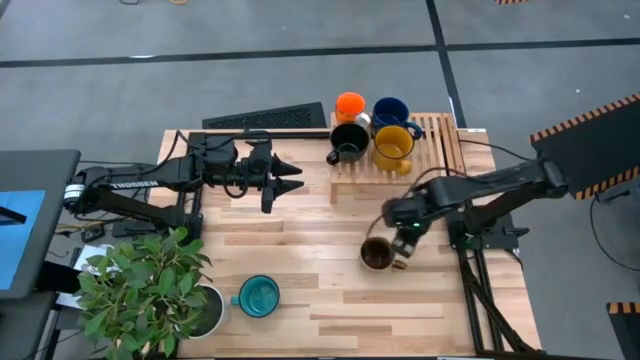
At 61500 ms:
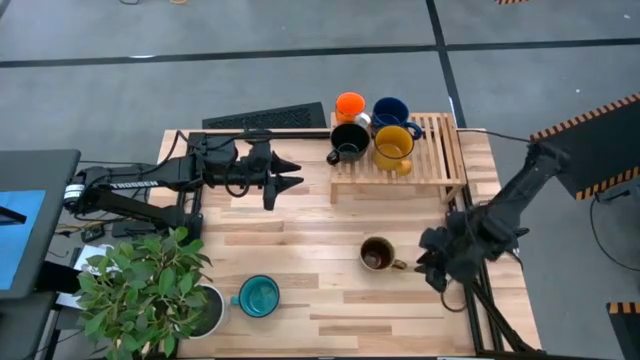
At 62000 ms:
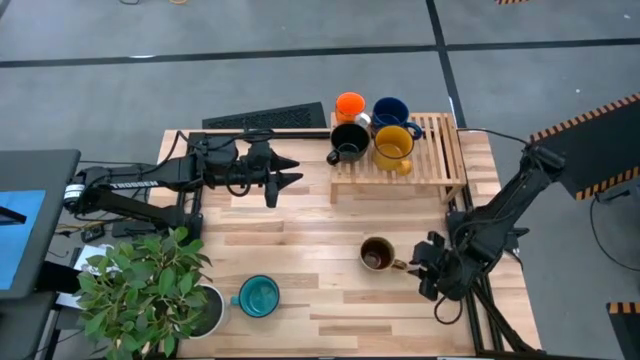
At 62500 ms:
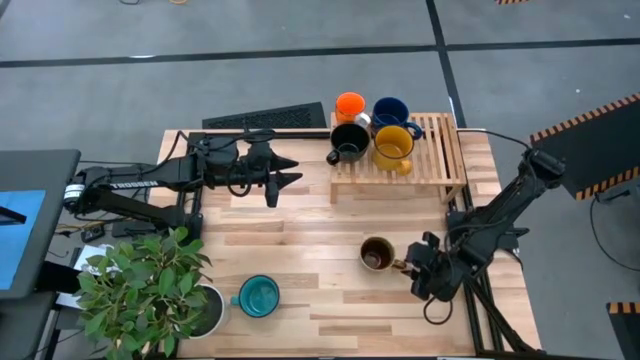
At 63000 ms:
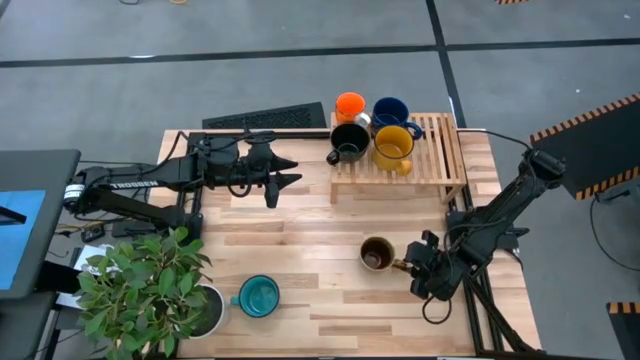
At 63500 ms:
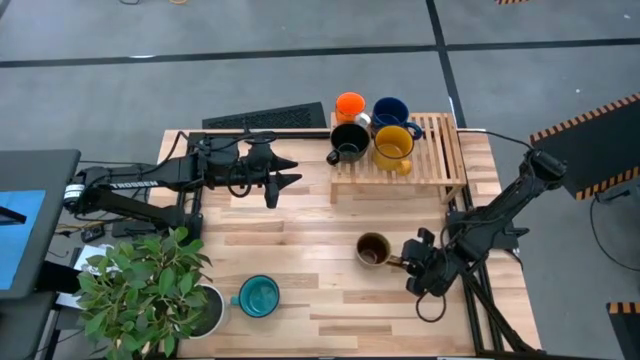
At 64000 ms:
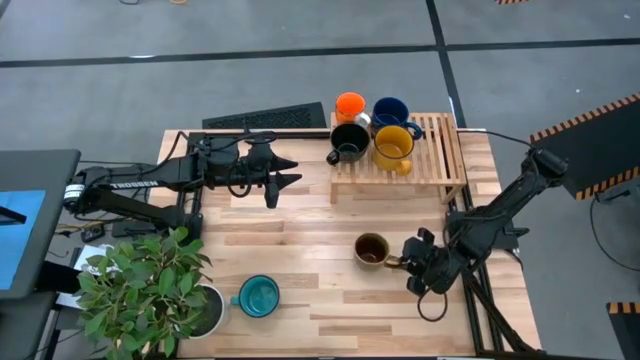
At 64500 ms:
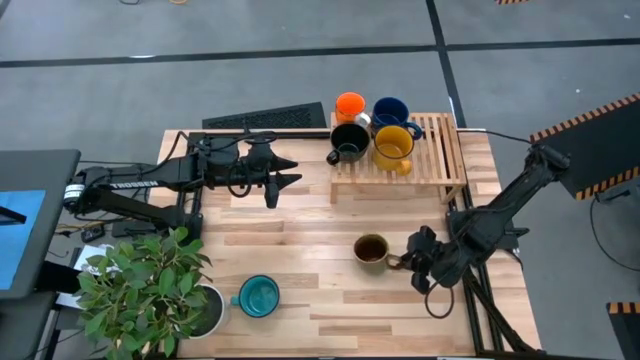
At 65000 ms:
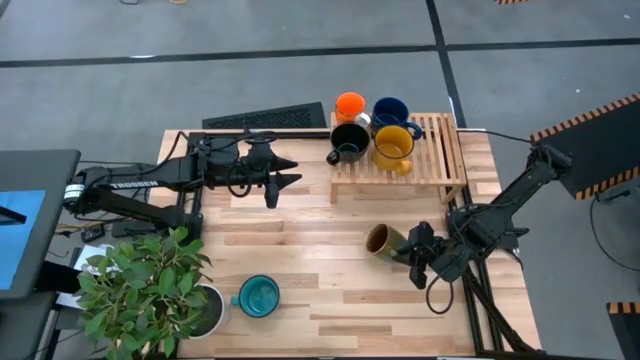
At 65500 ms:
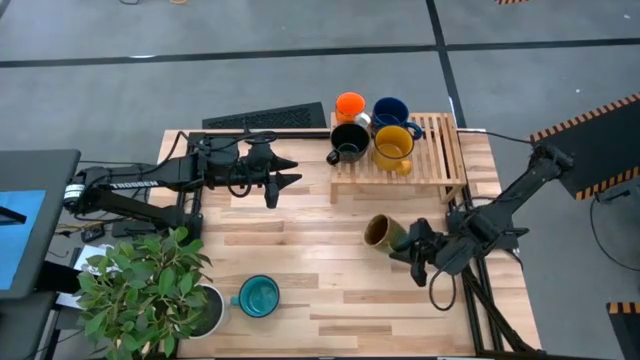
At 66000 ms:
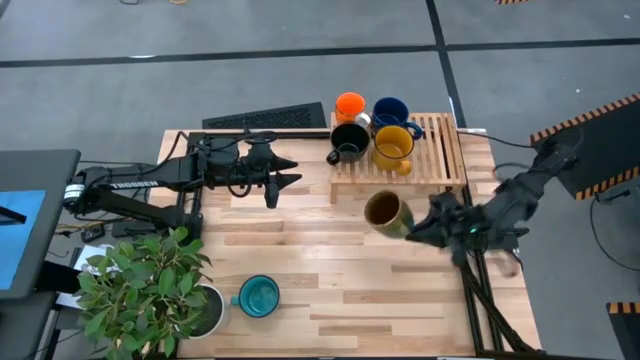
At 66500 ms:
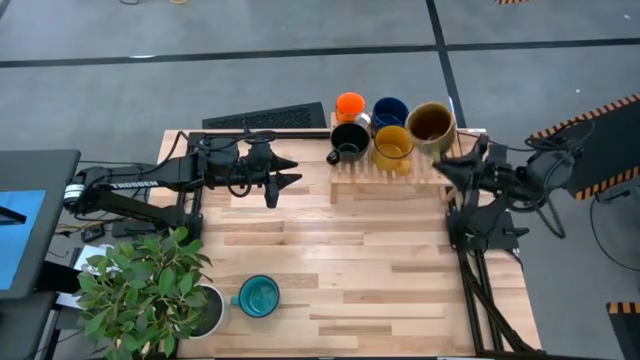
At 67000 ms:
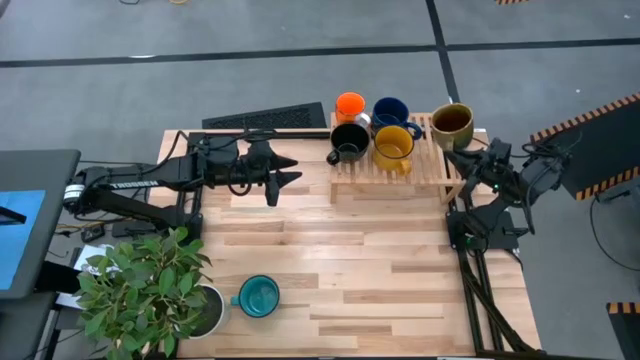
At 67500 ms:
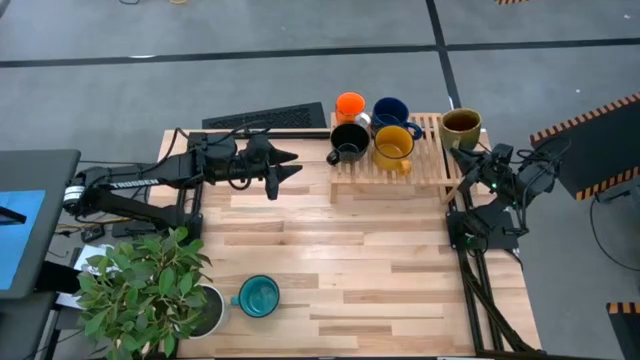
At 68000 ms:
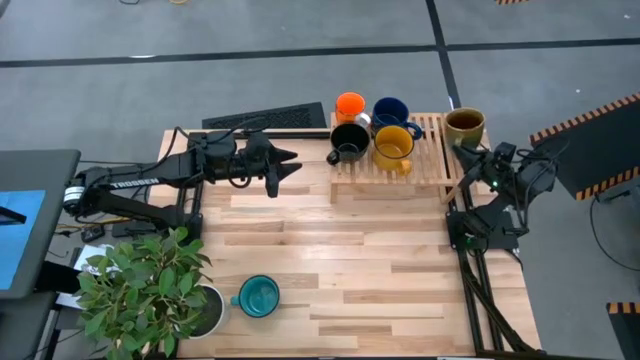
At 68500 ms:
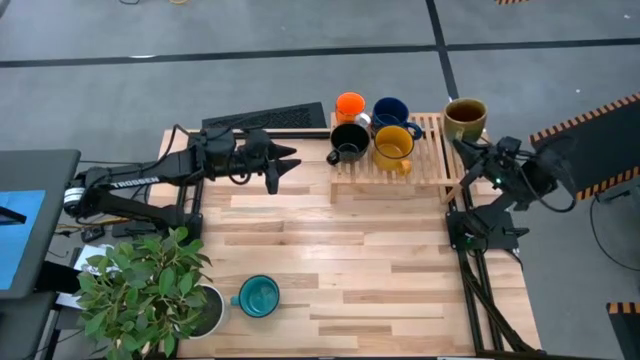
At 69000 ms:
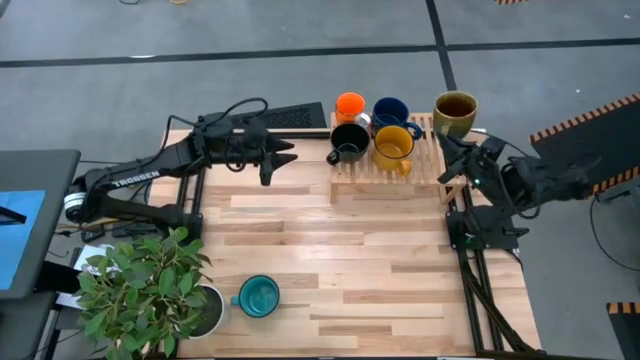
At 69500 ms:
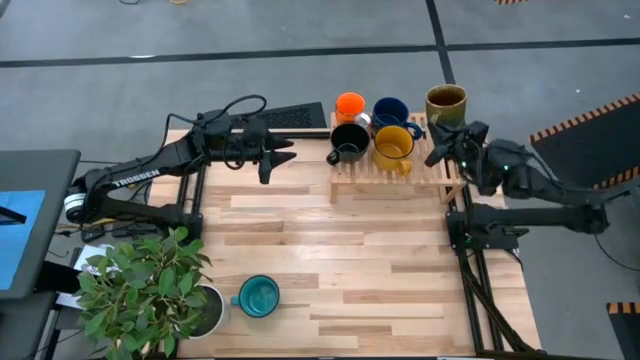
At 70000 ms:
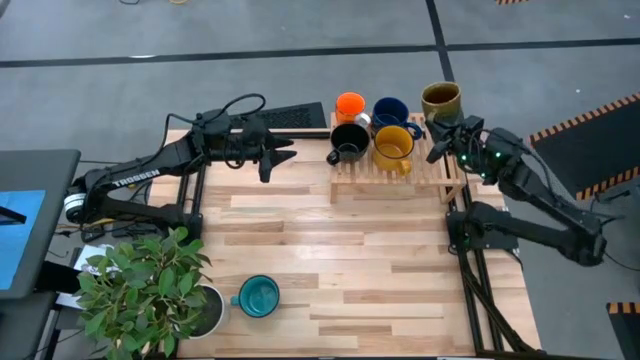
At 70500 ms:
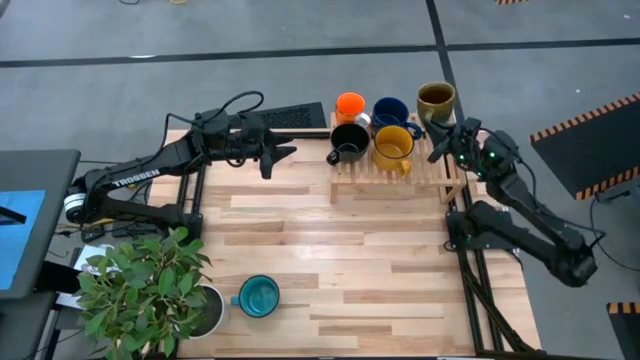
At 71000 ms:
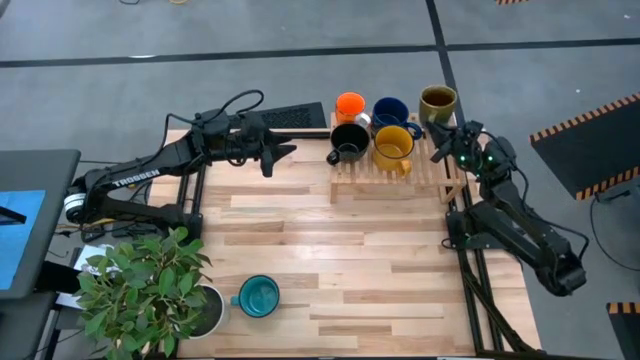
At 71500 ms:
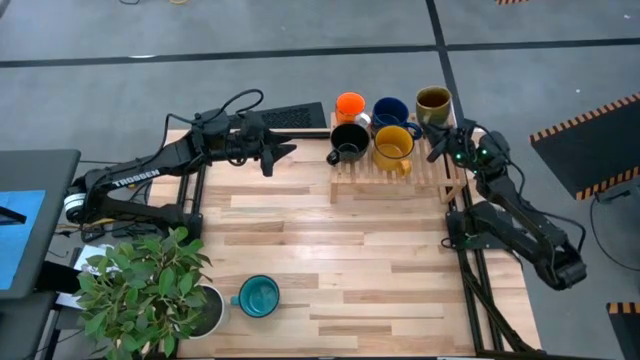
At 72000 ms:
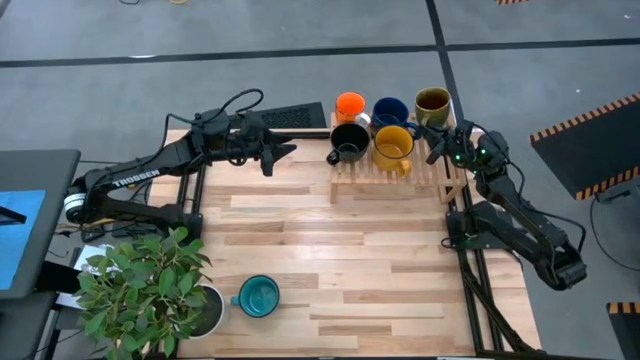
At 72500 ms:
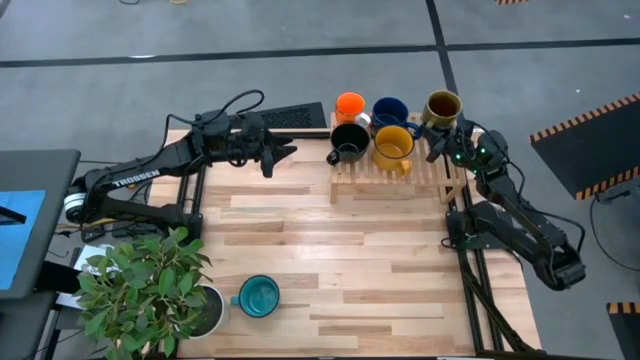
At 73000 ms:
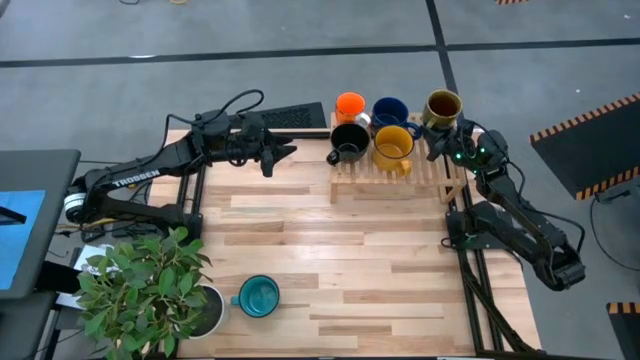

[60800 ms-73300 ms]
Task: Place coffee mugs
Put the dark green patterned mug on the shelf

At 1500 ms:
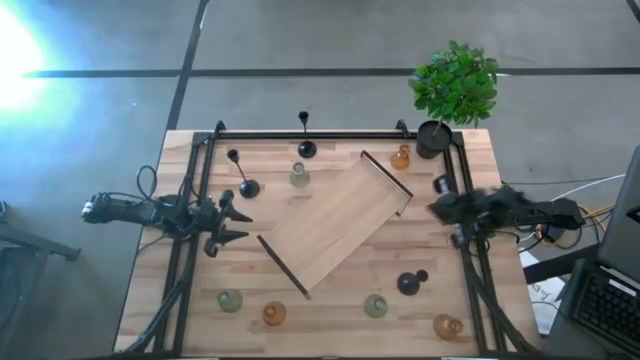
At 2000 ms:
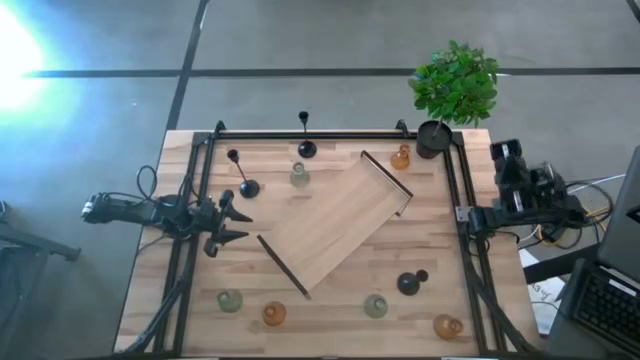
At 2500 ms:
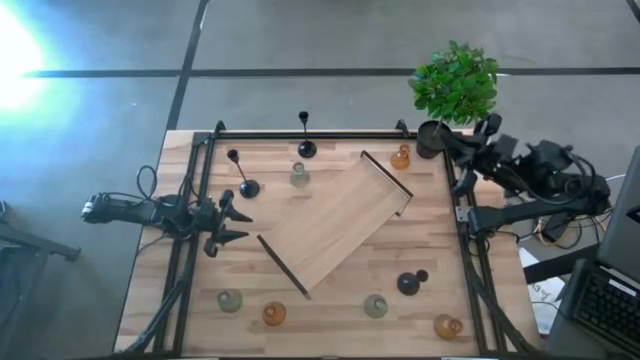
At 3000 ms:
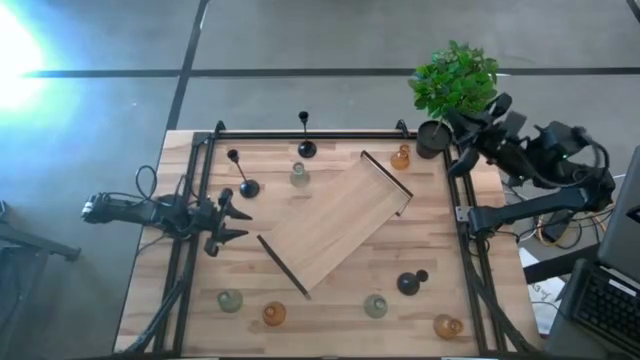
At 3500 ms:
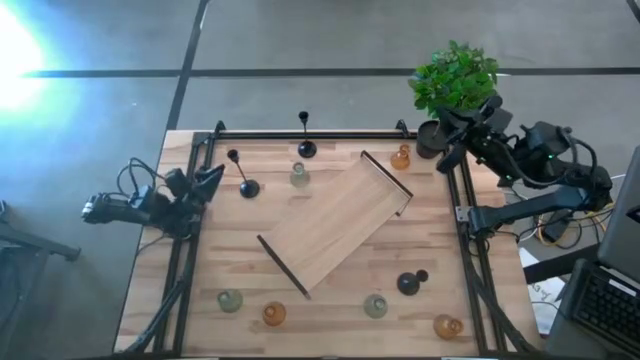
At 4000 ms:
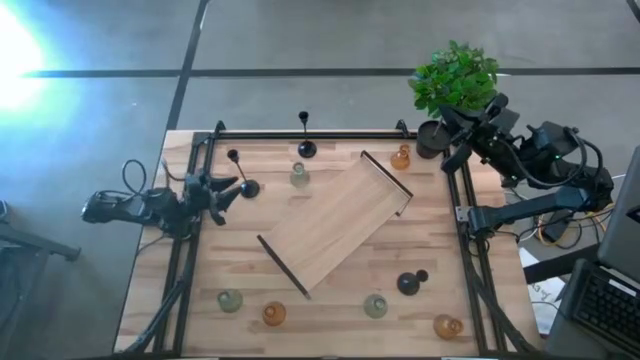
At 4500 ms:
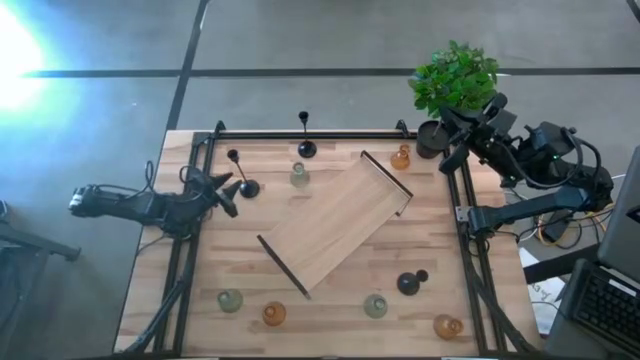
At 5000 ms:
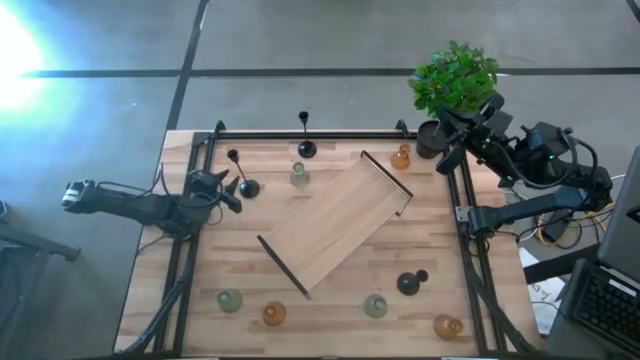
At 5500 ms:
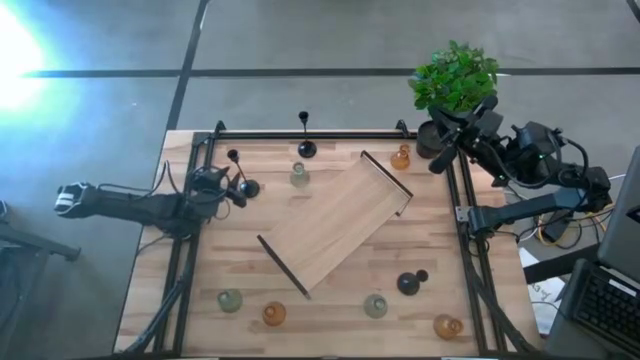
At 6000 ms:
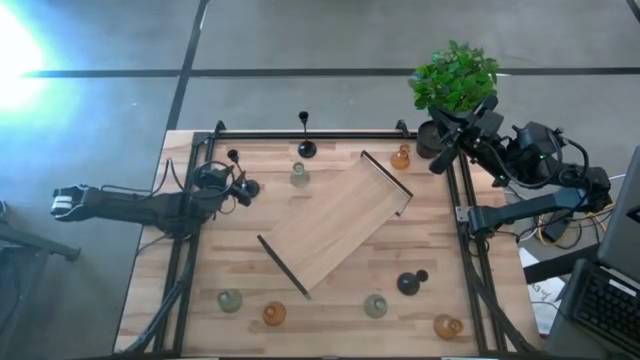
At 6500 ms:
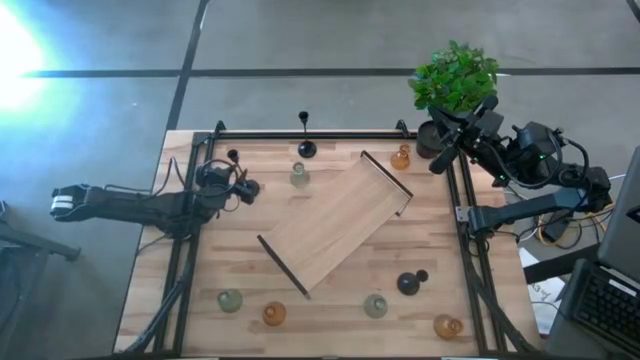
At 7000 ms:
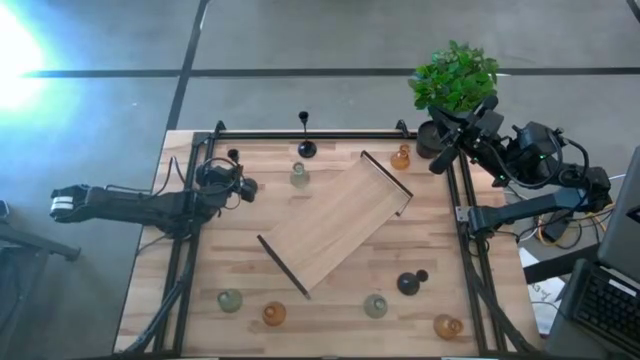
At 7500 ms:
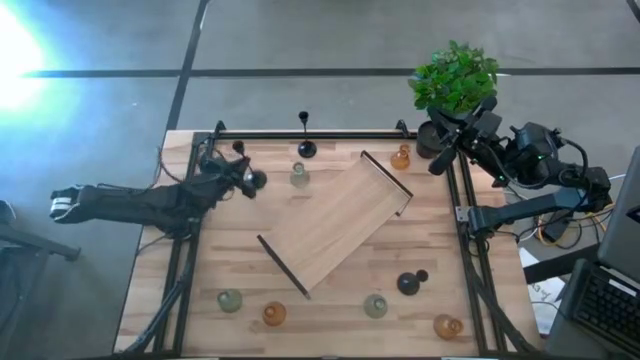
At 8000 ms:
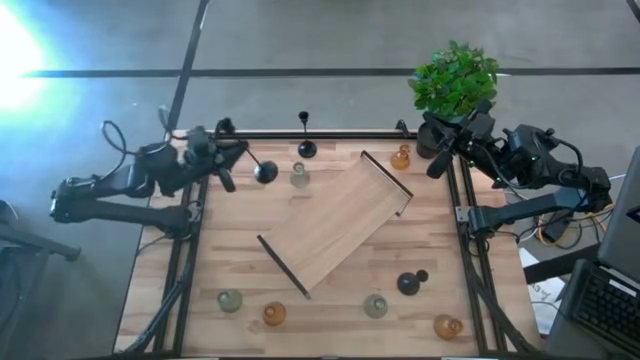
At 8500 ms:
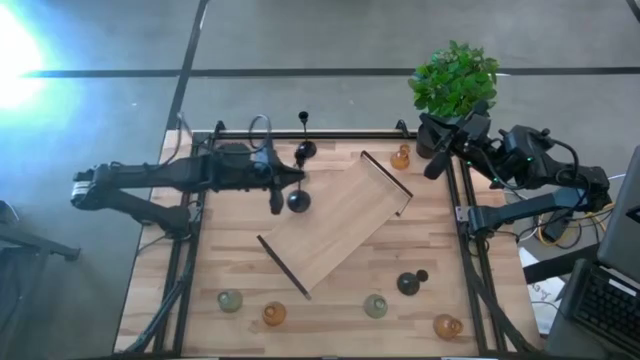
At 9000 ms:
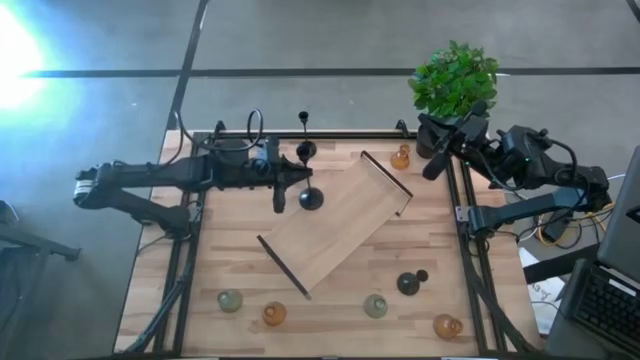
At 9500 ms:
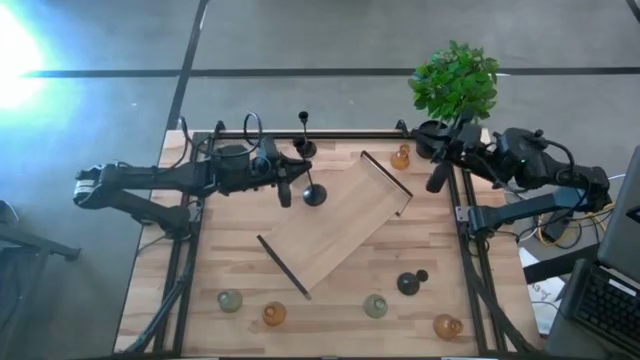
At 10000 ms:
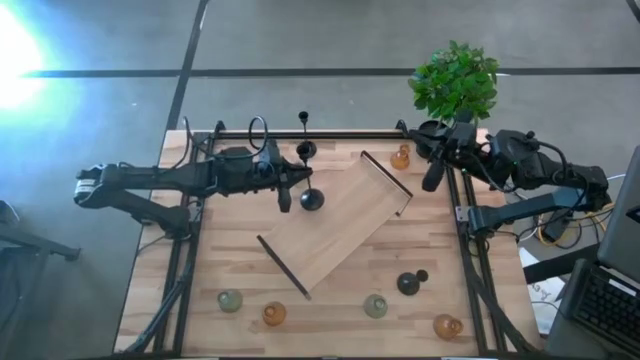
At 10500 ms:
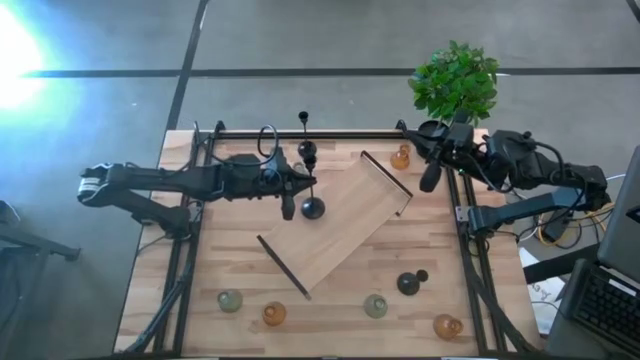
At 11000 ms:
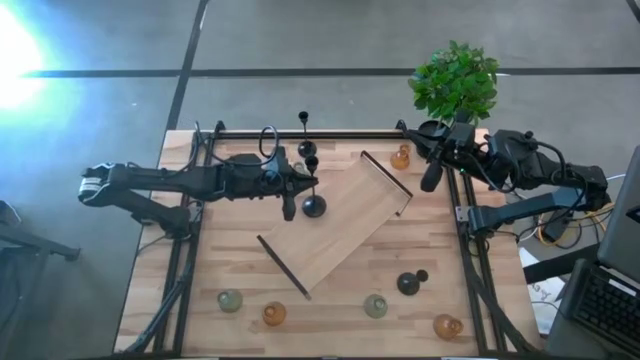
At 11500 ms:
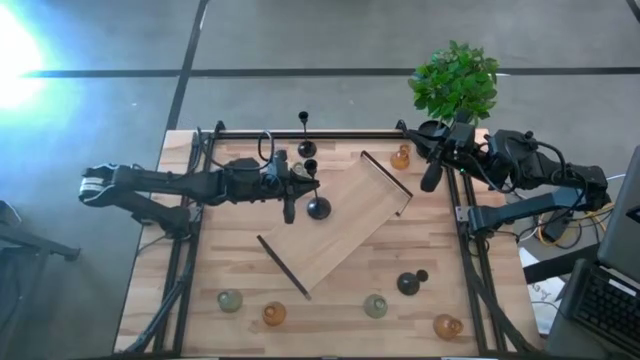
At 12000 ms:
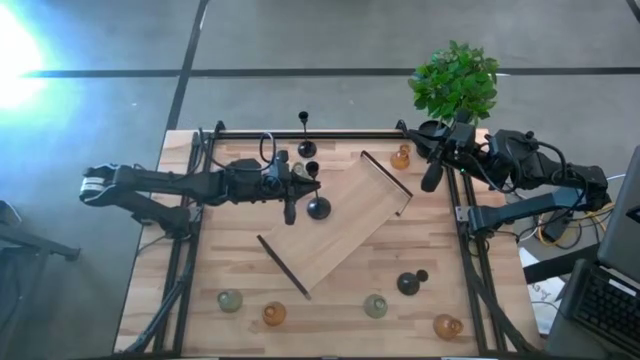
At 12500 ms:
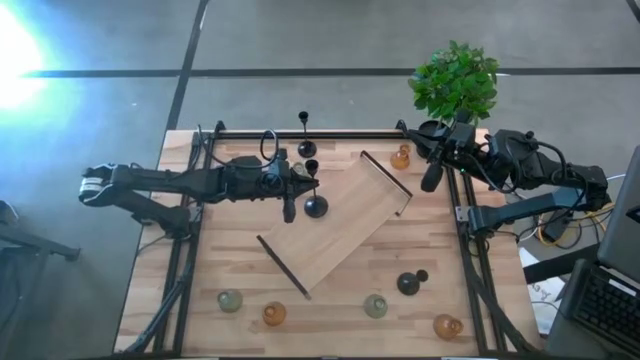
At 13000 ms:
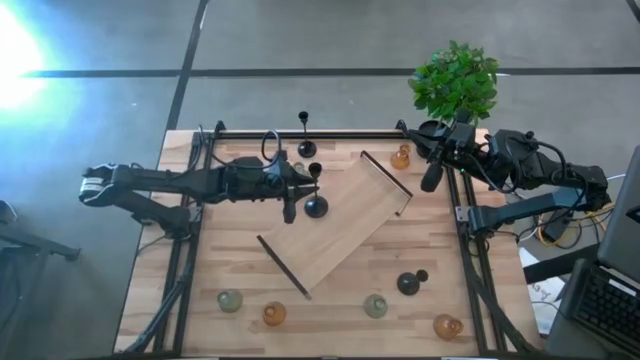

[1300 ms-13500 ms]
Task: Pick & Place candle stick holders
Put the middle left black candle holder on the shelf
